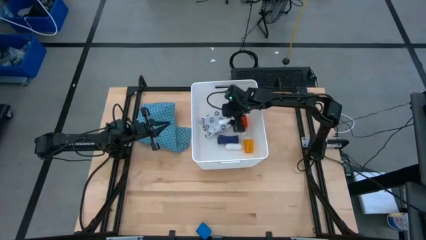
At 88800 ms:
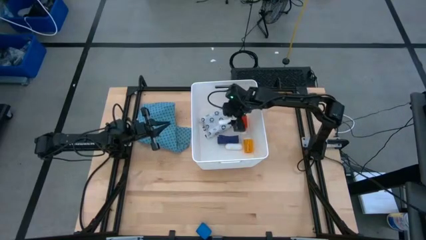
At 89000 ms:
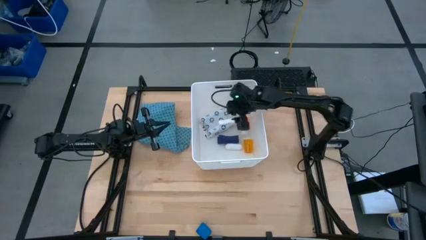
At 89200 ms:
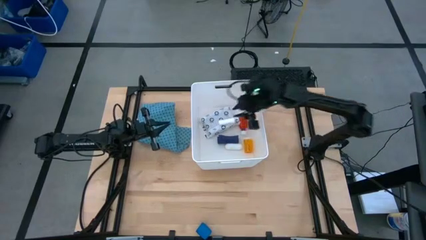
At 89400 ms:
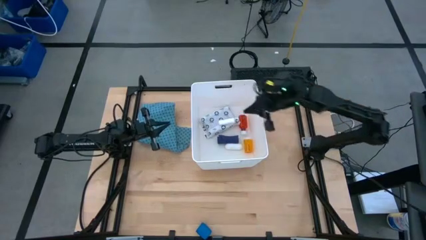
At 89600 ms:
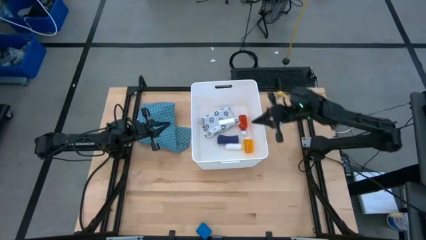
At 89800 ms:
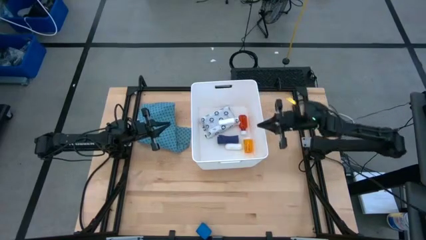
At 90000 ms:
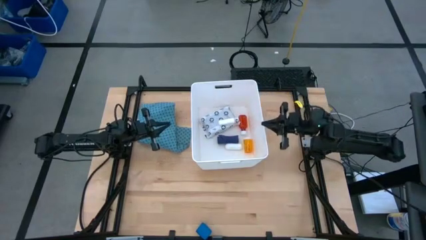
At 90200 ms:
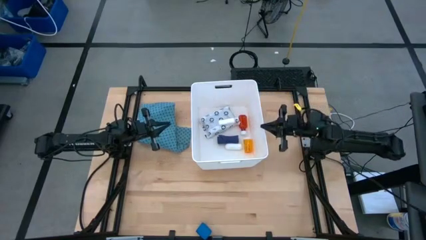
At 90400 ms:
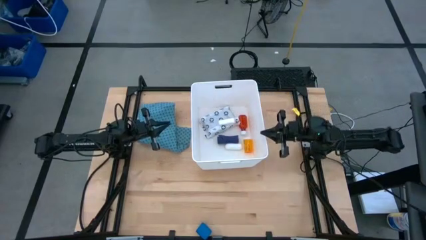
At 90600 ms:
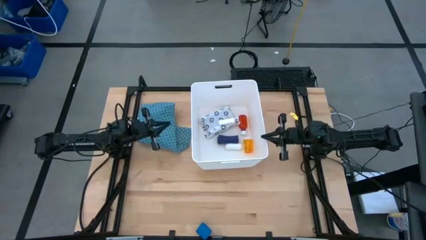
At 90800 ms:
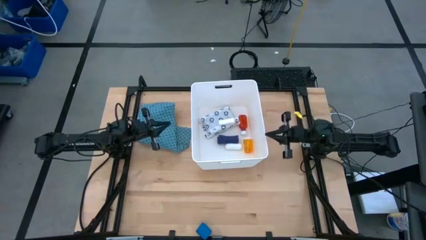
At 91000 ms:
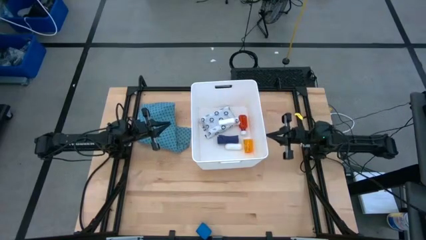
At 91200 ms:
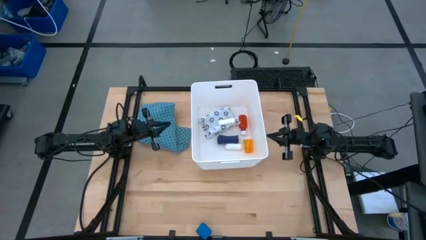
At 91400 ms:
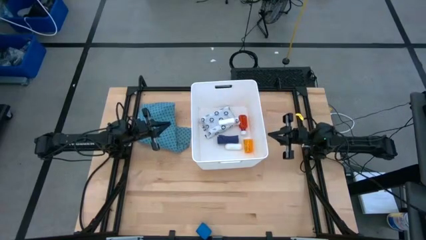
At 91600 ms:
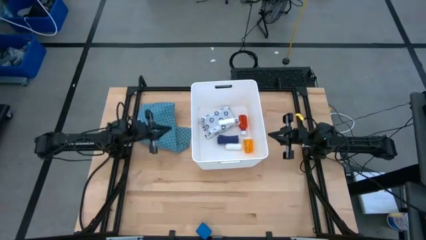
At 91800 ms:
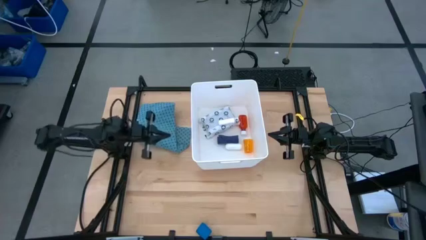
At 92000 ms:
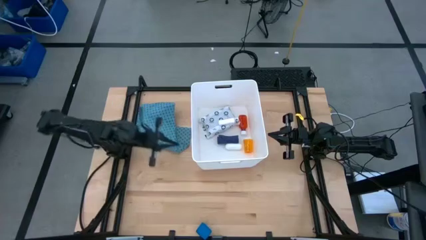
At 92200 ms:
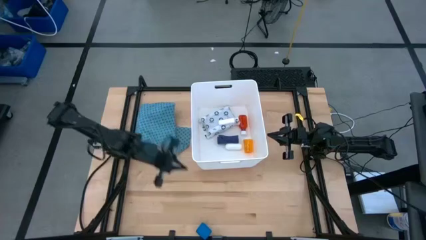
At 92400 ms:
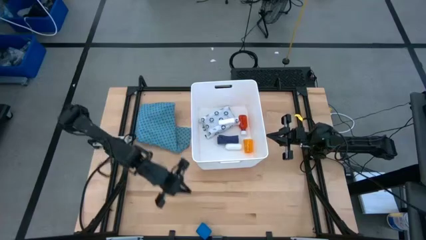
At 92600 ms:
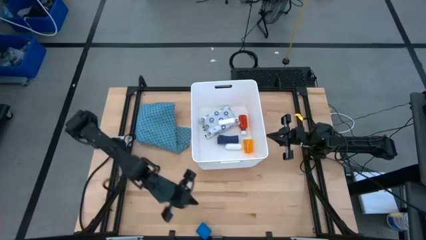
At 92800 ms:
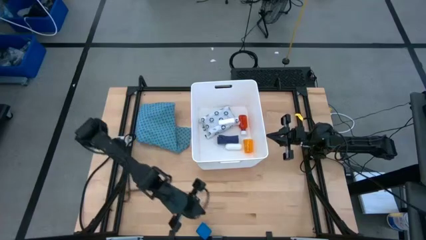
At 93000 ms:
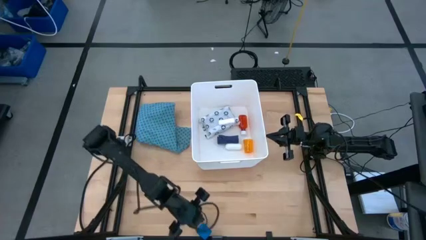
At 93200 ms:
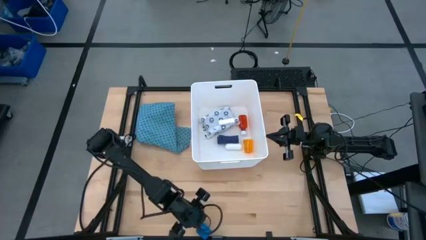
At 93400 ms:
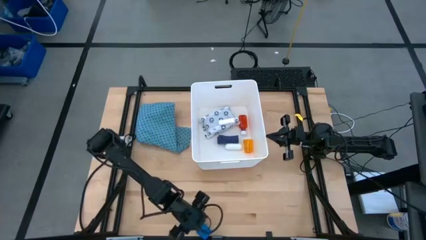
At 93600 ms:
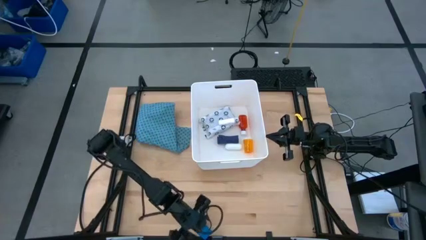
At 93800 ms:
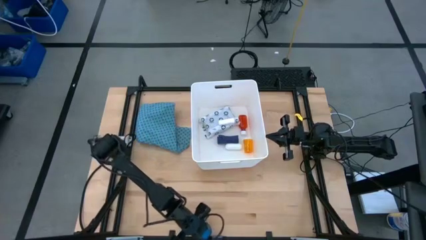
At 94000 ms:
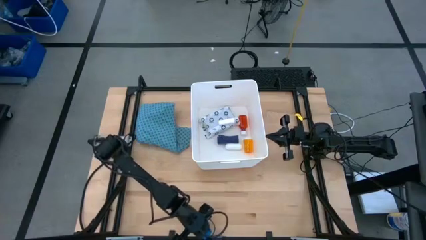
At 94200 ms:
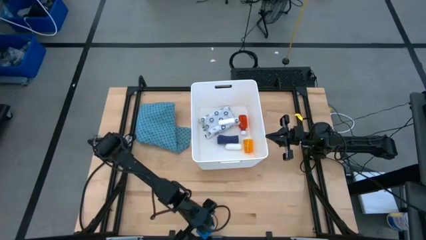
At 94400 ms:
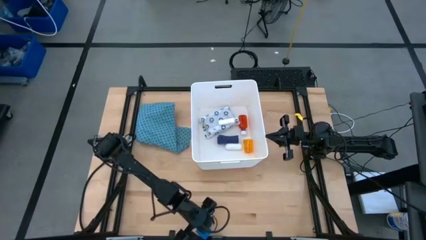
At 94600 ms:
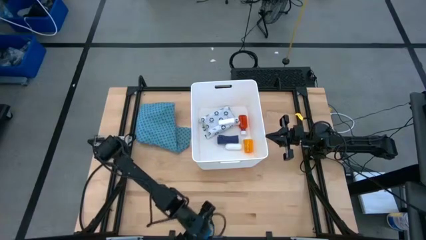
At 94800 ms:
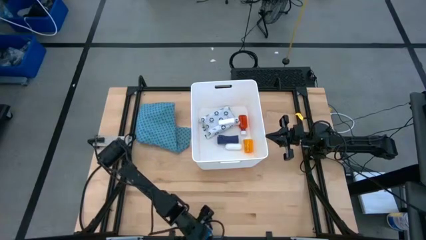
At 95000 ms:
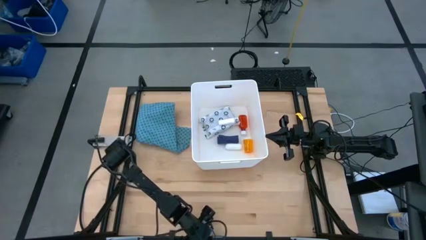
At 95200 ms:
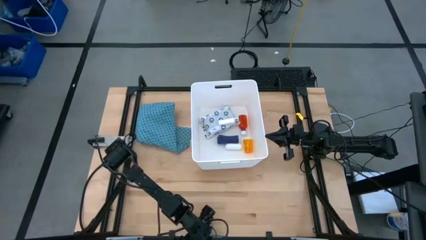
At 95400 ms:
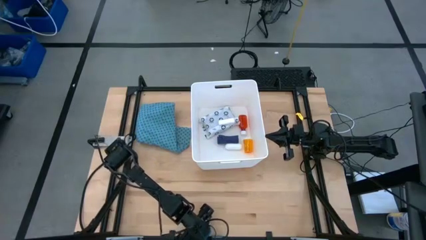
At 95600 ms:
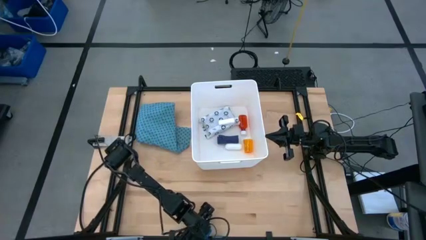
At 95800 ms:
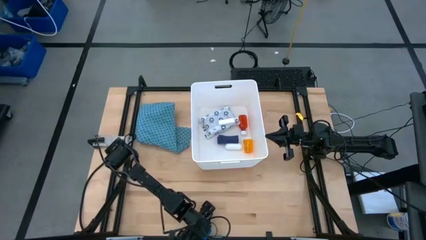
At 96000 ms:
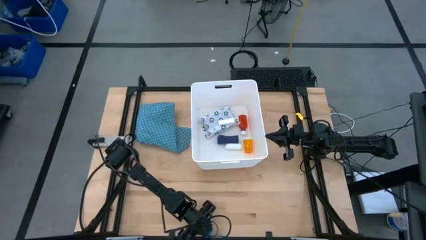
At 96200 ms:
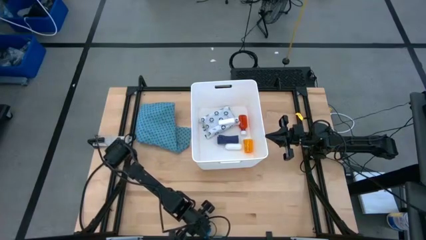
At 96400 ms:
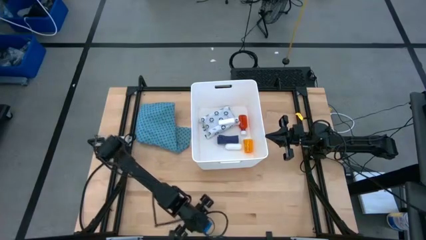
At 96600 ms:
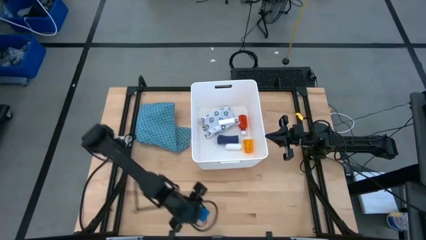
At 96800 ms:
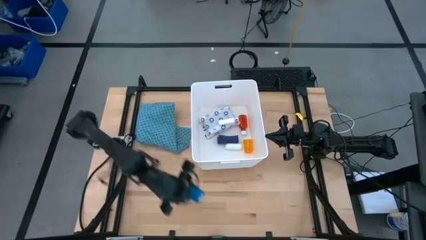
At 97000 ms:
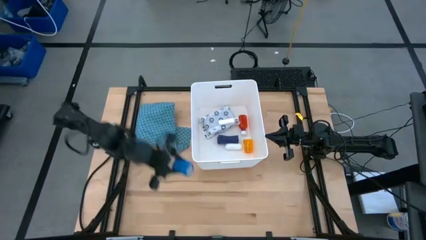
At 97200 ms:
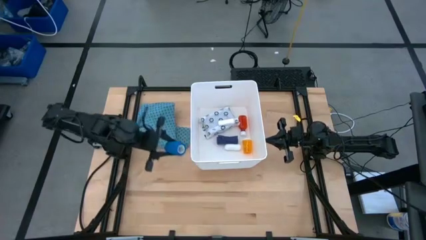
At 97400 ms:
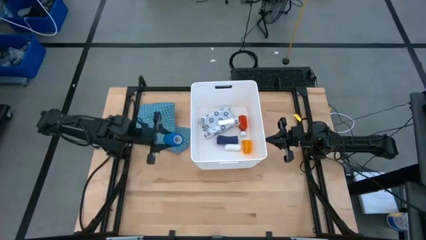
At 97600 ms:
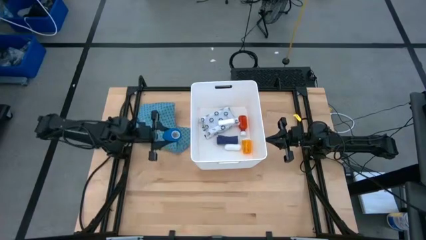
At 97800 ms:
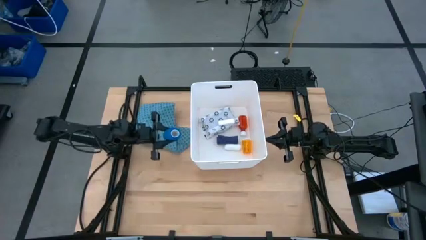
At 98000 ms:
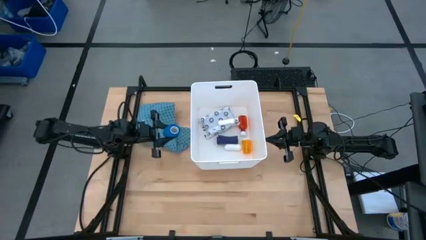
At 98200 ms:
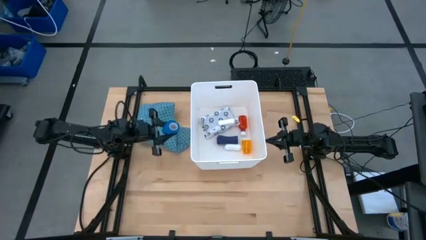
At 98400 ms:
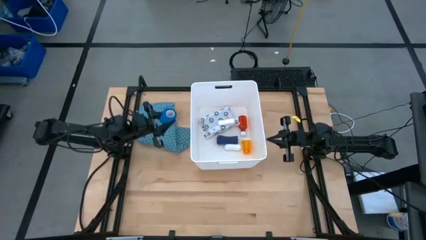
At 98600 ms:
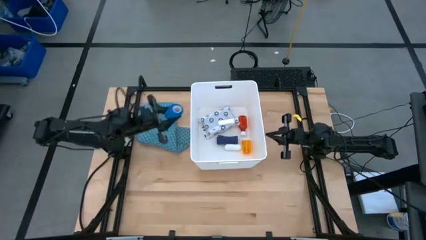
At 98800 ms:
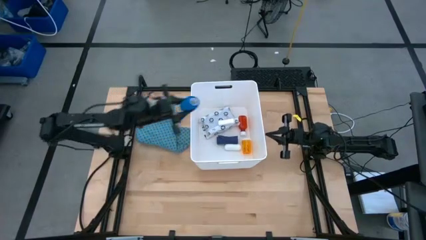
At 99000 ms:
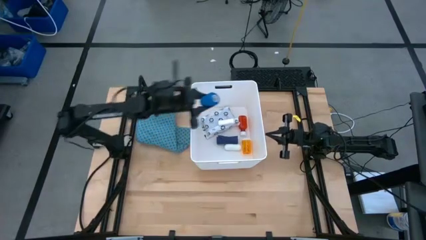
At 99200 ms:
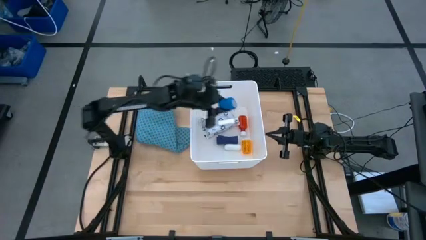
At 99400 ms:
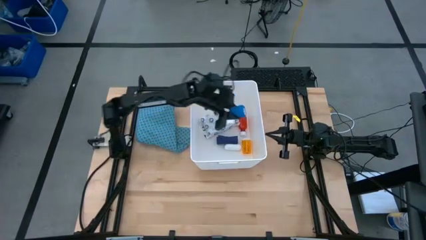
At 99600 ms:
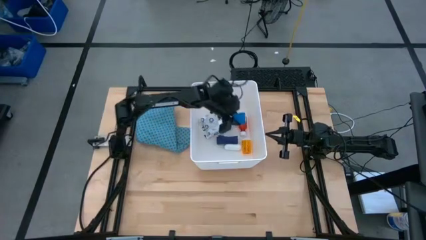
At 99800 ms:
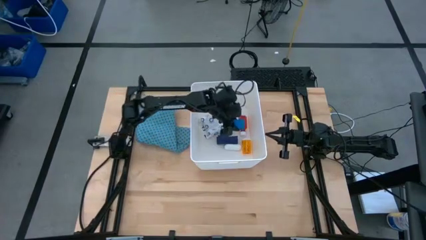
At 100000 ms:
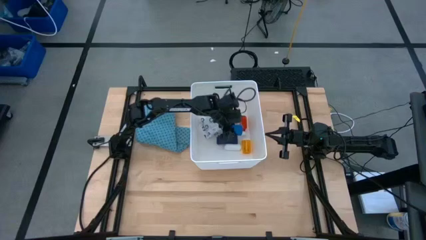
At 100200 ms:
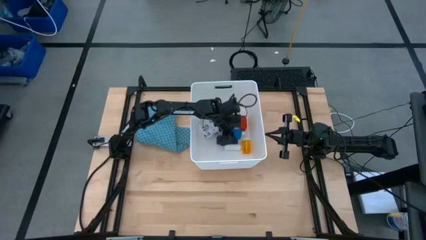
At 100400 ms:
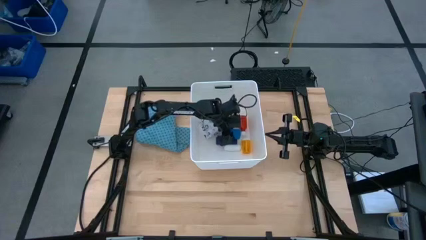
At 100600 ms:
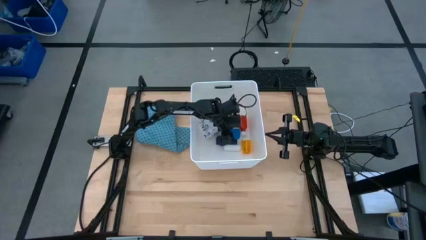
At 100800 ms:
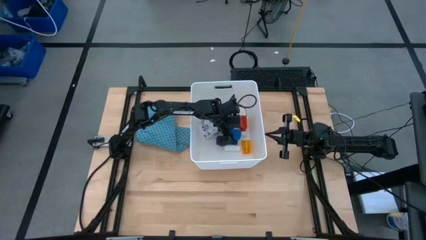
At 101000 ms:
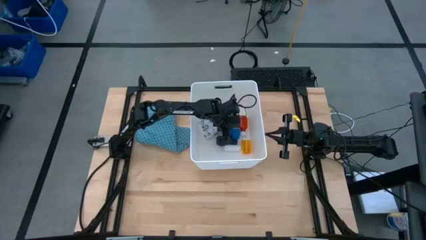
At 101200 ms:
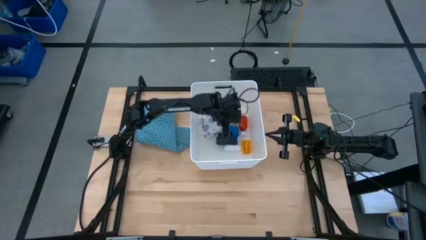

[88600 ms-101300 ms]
Task: Pick & place medical supplies in basket/bin
Put the small blue bandage into the white bin

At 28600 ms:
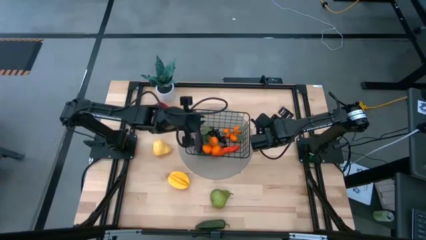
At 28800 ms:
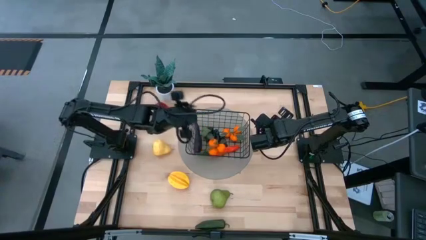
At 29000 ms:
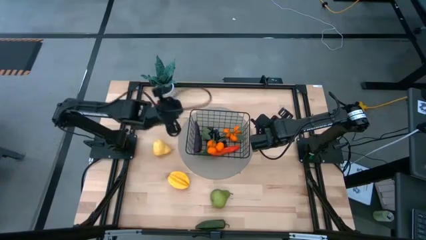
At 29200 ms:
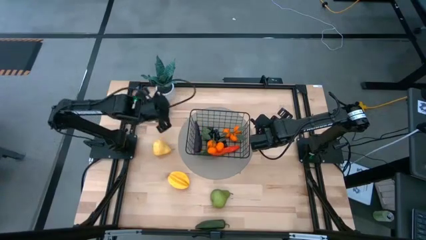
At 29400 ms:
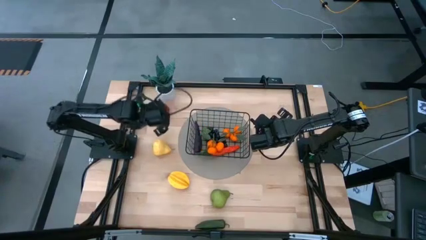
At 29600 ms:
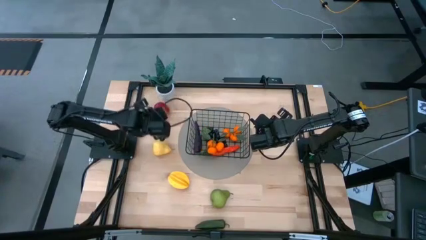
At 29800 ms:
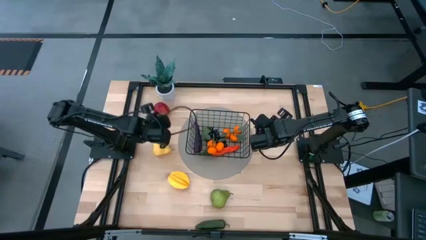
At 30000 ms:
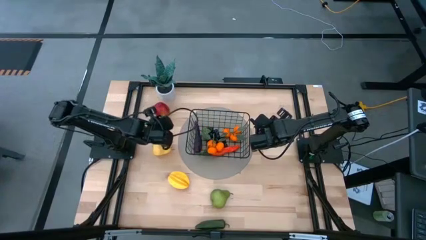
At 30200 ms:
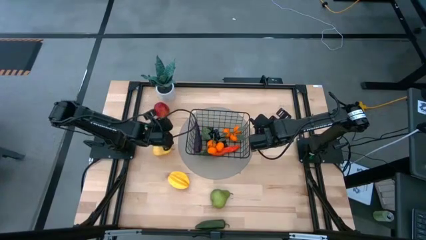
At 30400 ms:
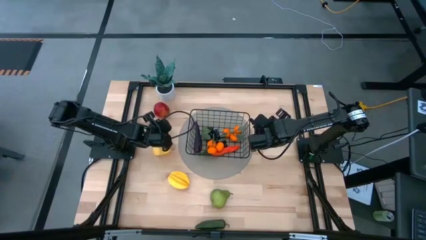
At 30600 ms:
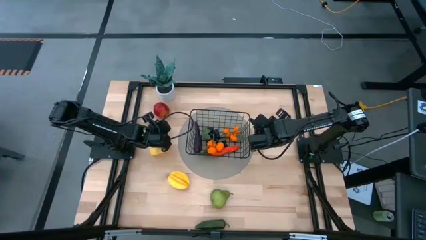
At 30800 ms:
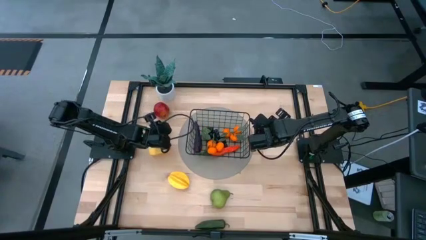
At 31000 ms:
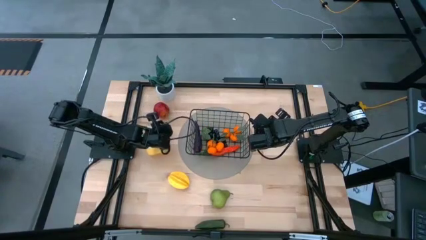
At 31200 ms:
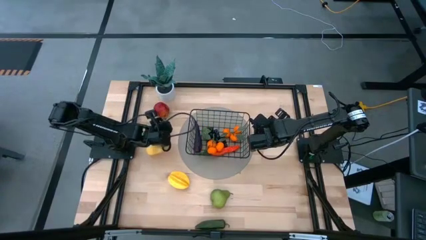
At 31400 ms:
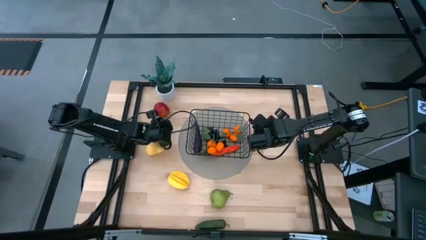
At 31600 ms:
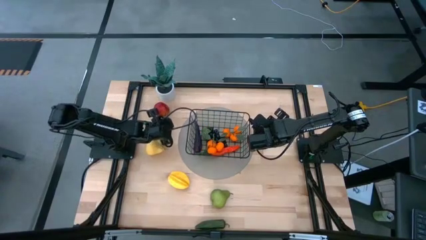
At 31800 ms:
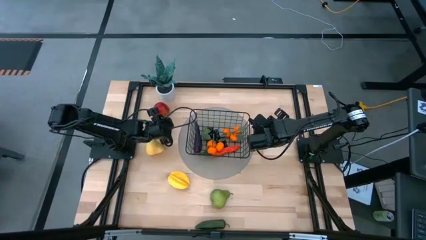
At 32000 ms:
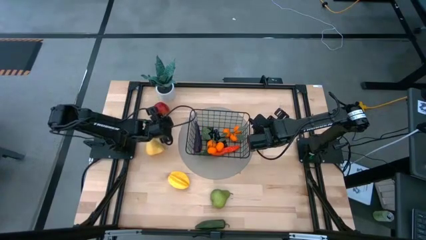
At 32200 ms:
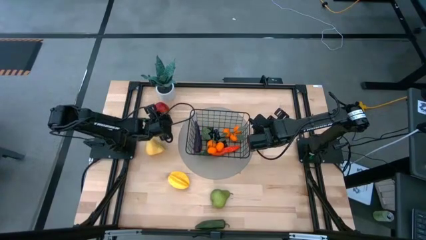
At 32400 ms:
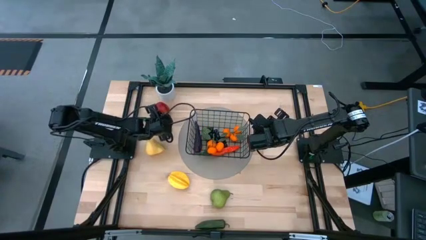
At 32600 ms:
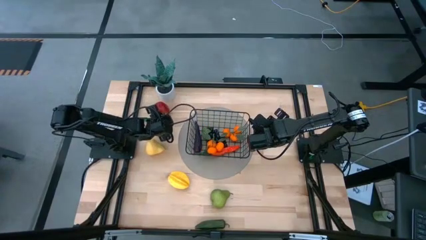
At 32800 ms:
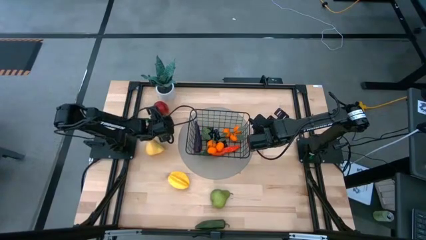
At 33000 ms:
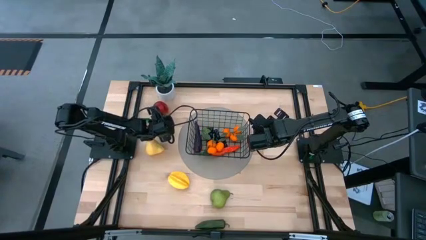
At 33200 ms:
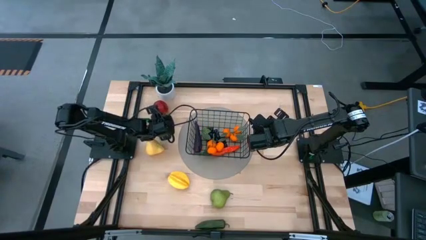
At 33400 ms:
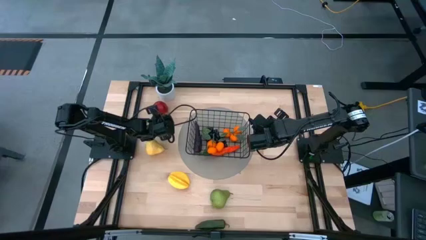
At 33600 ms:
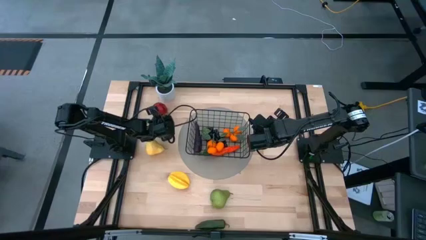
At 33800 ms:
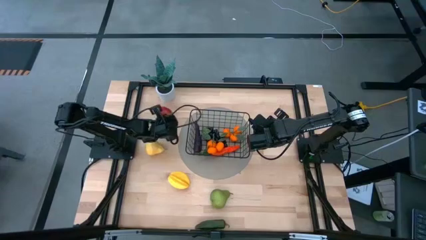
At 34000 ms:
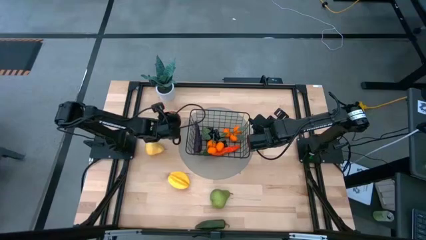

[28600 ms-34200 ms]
Task: Build produce basket
Put the red pomegranate into the black wire basket
